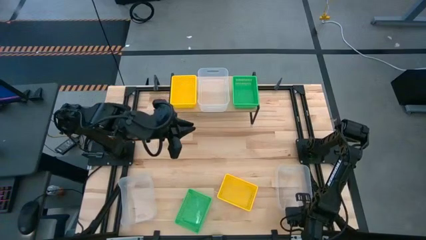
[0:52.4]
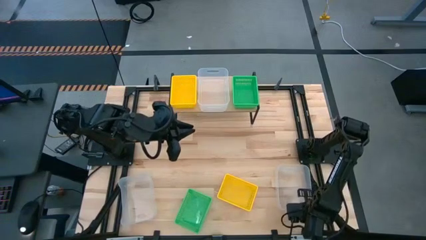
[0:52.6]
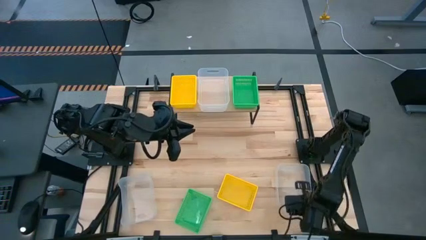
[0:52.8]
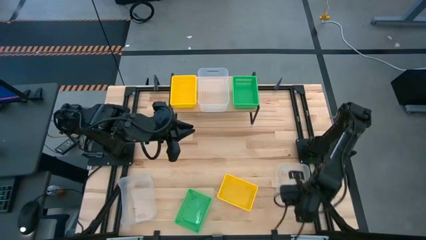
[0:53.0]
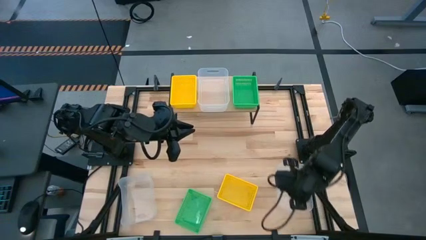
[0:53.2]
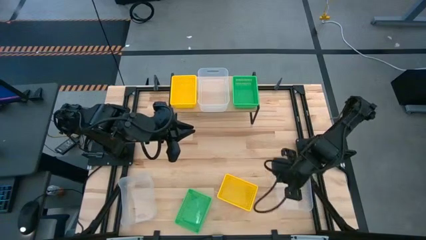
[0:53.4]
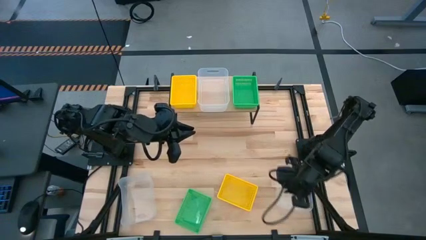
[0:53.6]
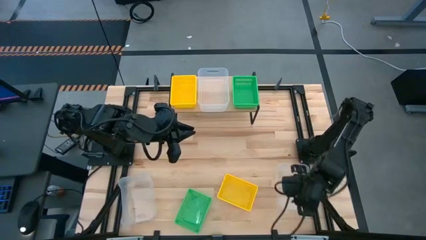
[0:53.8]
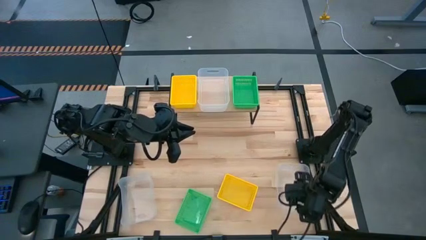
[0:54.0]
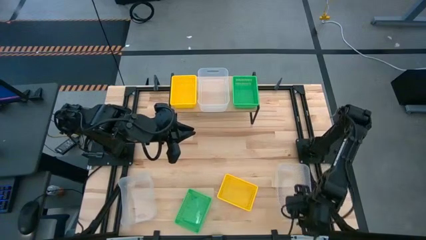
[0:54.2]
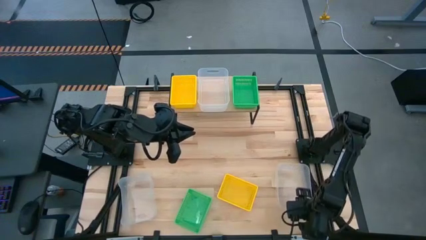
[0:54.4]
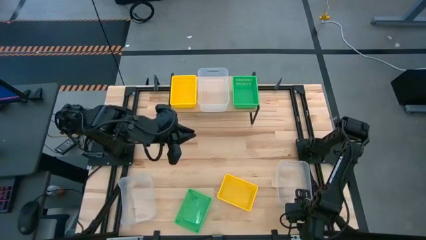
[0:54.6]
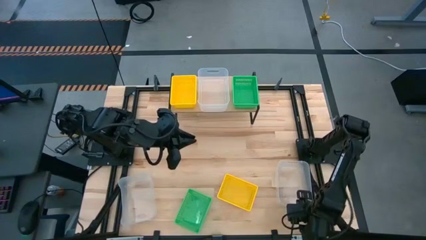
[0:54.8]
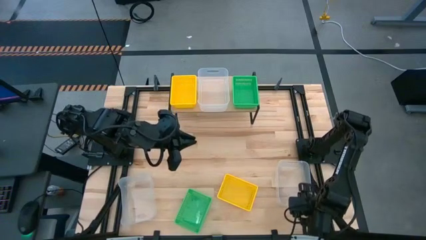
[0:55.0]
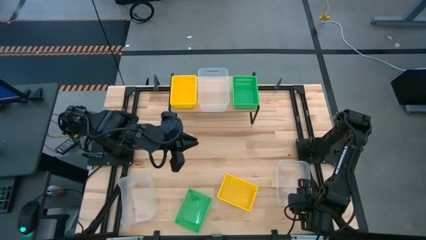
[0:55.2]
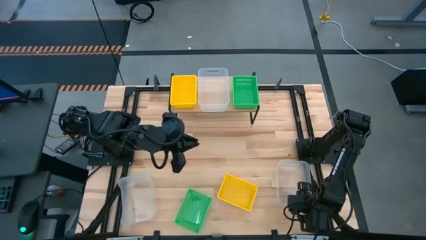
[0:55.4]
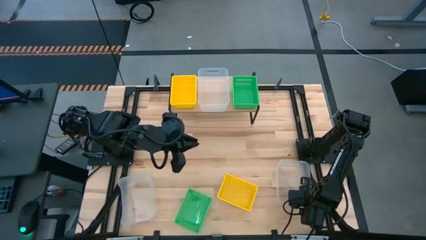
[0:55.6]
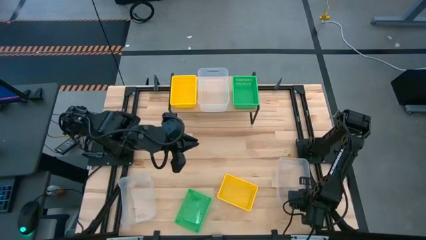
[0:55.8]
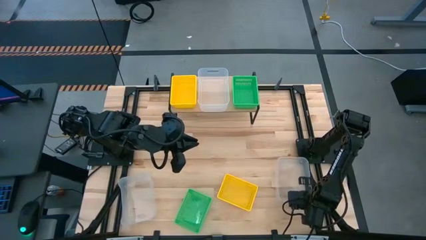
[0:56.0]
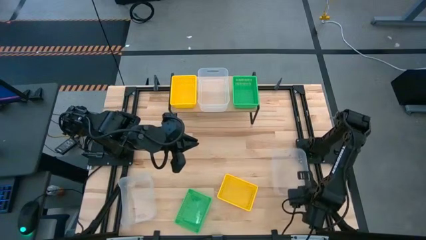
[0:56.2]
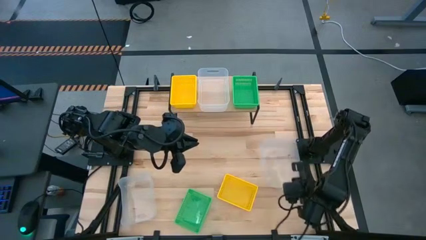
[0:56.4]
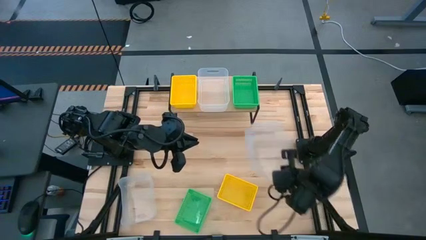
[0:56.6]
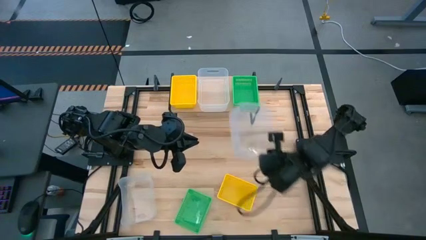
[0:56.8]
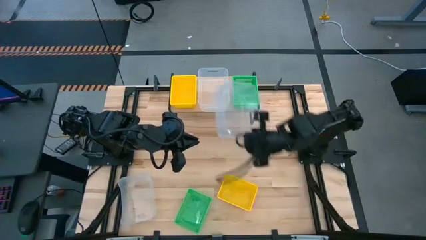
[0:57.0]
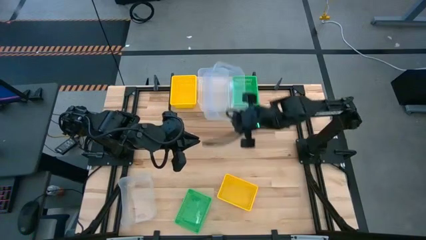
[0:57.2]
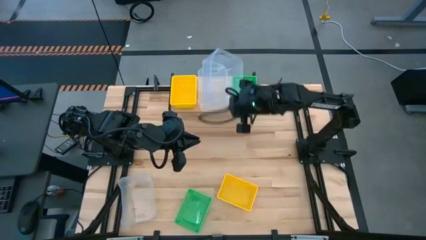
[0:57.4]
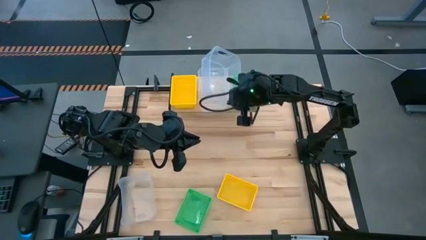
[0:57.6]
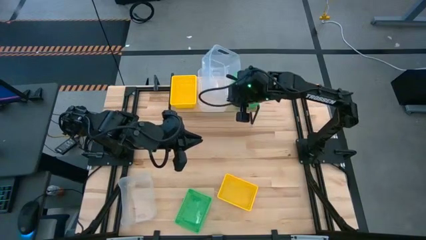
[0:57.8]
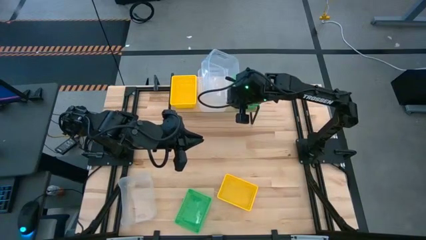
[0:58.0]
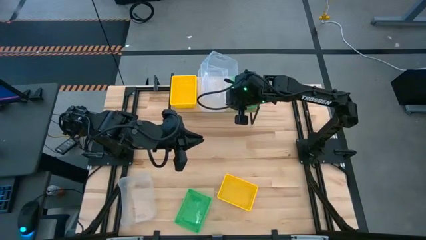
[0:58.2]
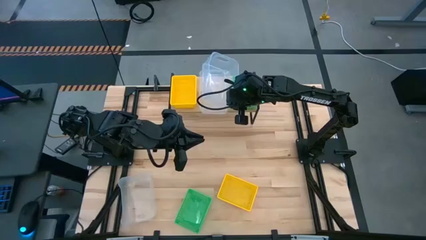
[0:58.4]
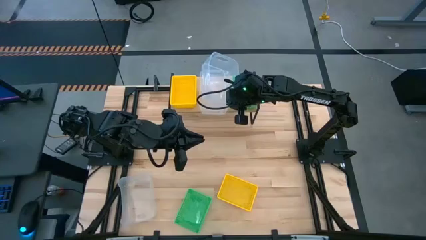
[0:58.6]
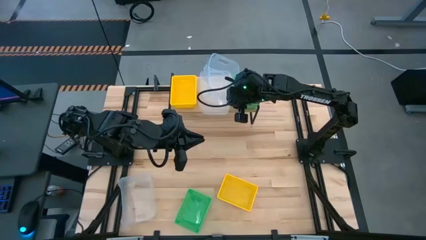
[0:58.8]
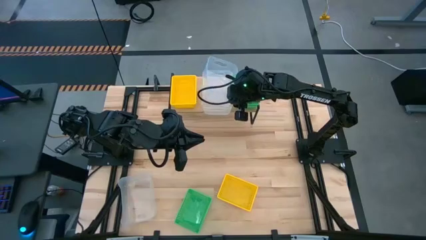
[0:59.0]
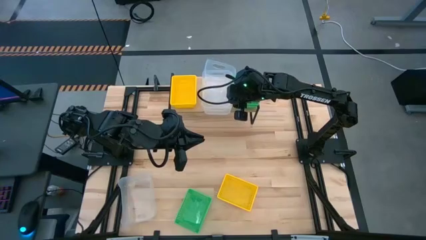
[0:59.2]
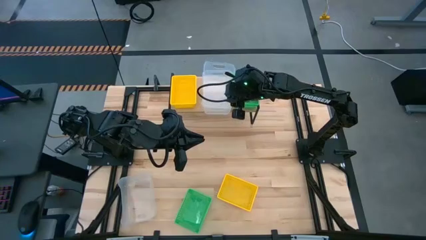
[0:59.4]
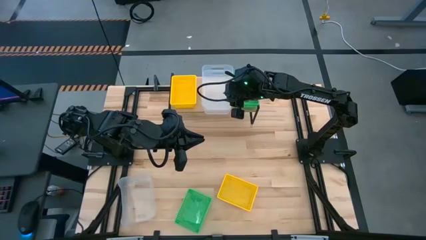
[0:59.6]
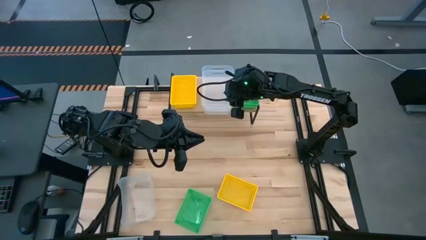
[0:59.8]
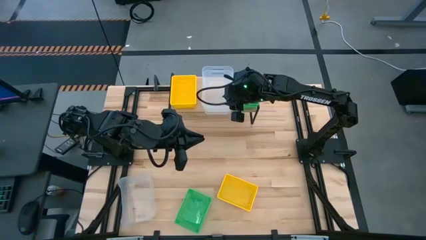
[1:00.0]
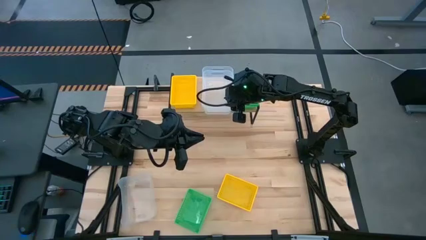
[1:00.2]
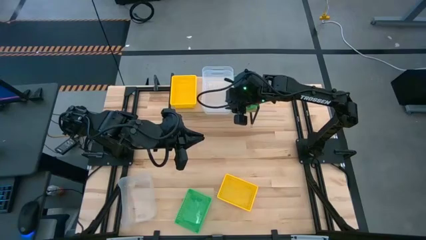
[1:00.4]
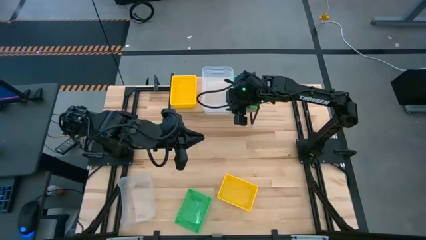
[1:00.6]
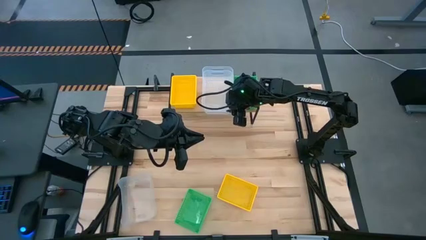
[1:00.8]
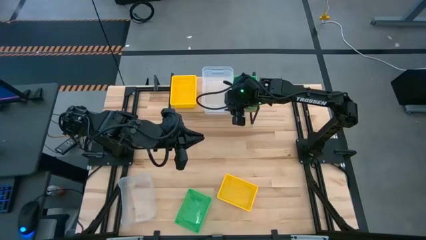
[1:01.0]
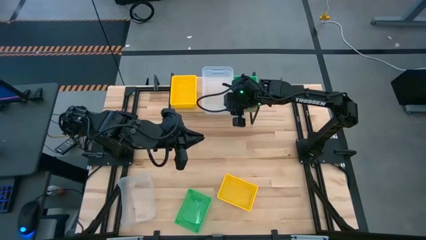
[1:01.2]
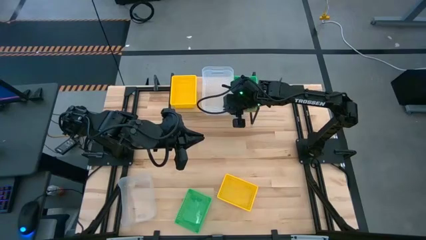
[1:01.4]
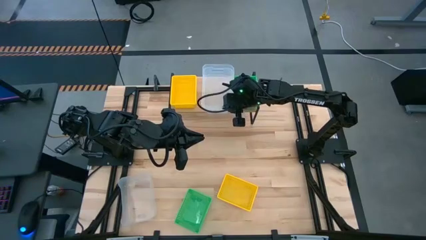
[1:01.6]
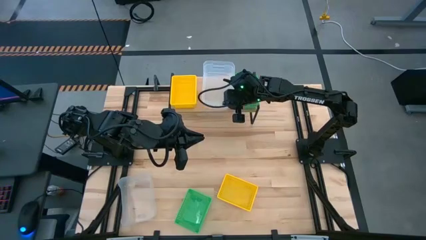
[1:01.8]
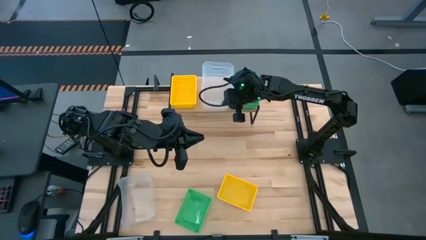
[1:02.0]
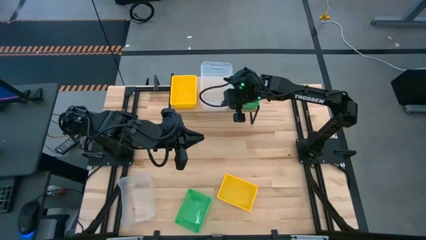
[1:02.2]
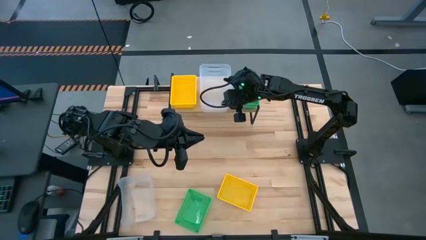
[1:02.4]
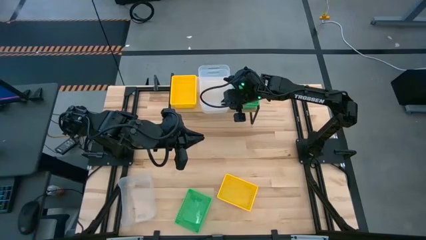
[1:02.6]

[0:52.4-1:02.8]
Task: Stack baskets on shelf by color
Stack the right transparent bin on top of the transparent bin on the shelf

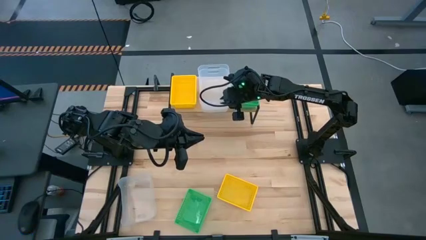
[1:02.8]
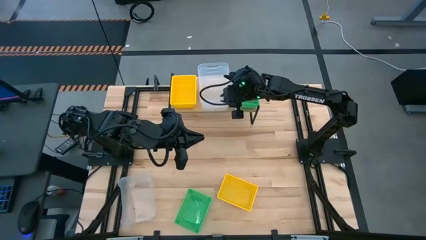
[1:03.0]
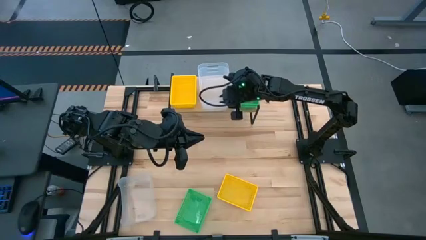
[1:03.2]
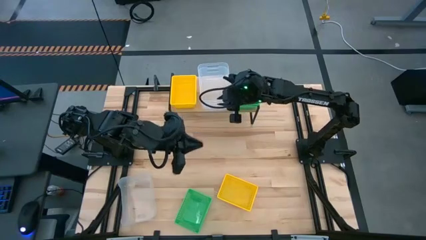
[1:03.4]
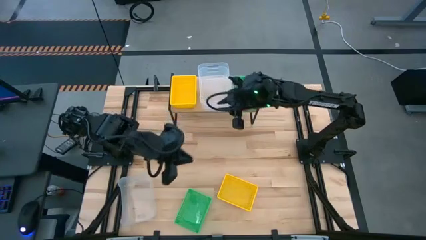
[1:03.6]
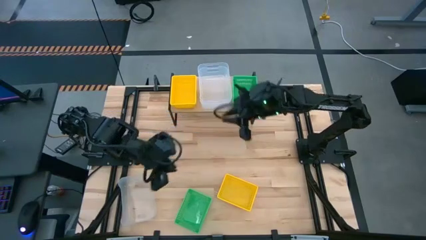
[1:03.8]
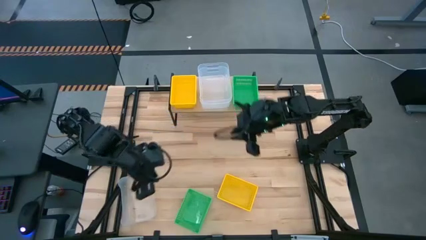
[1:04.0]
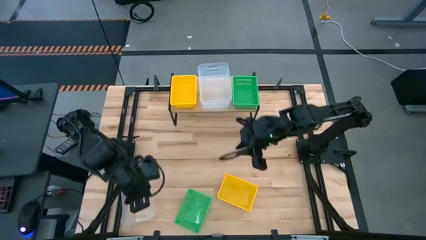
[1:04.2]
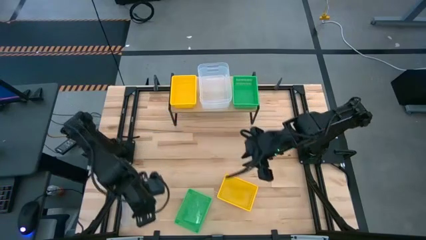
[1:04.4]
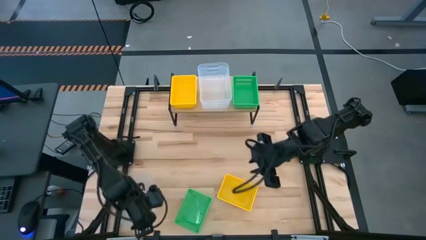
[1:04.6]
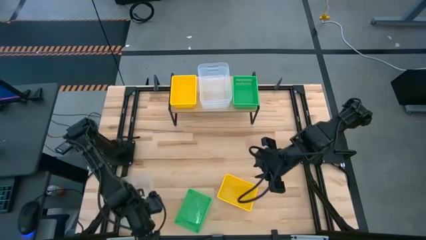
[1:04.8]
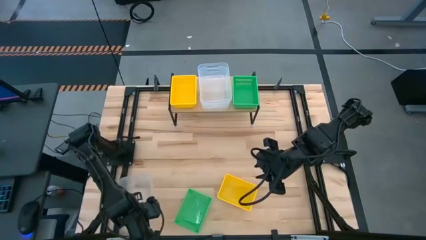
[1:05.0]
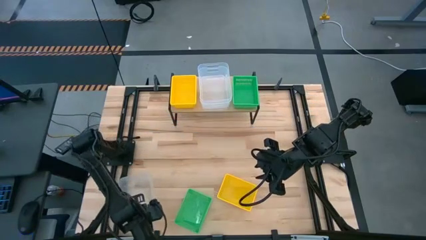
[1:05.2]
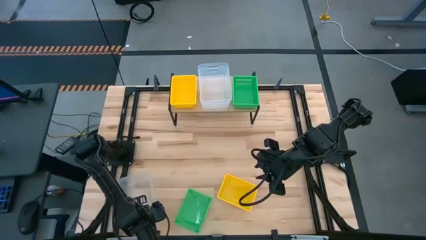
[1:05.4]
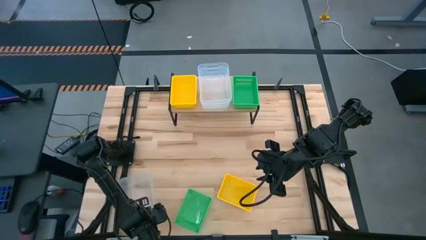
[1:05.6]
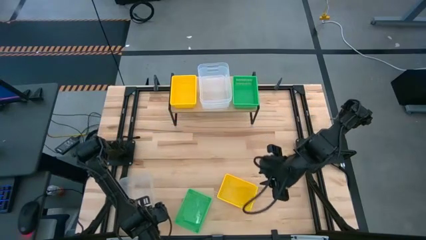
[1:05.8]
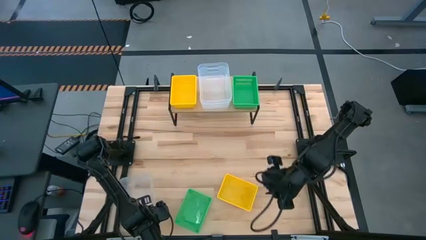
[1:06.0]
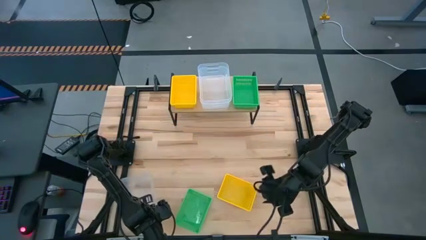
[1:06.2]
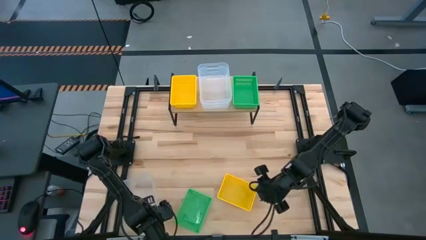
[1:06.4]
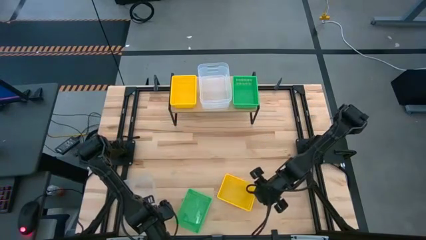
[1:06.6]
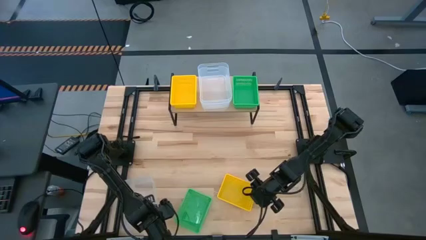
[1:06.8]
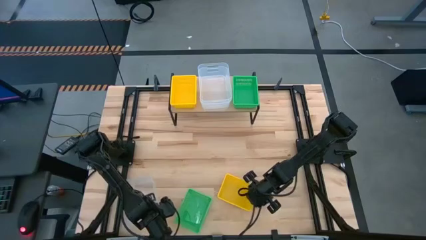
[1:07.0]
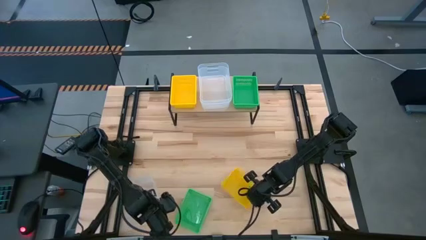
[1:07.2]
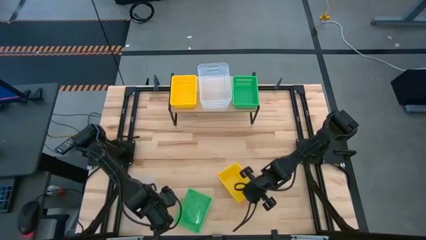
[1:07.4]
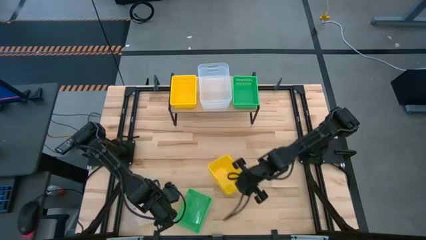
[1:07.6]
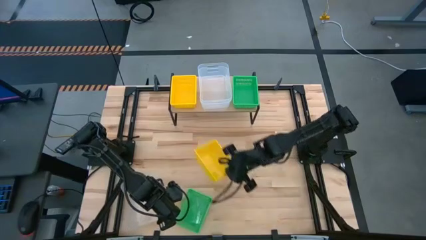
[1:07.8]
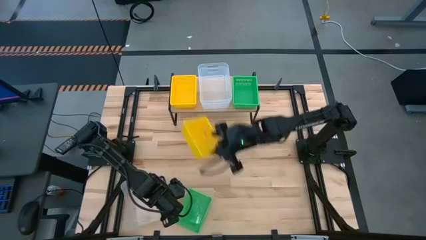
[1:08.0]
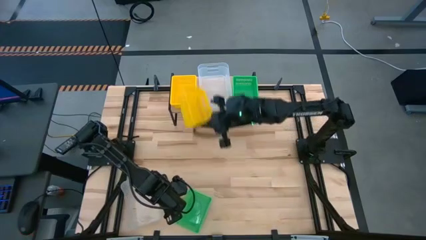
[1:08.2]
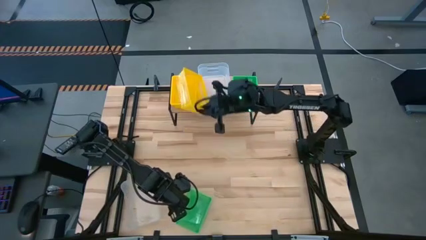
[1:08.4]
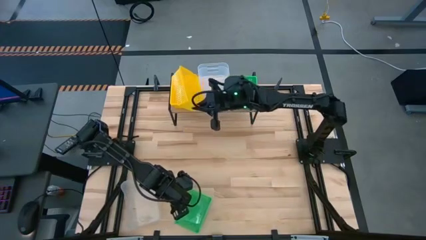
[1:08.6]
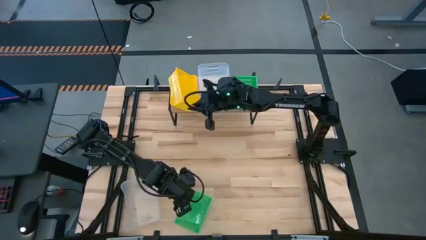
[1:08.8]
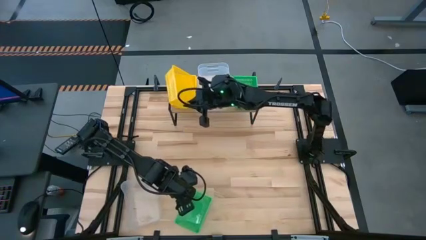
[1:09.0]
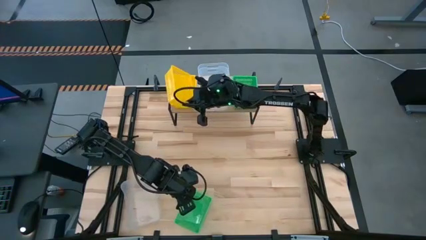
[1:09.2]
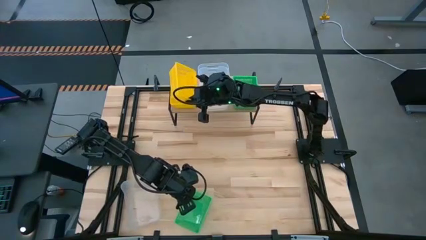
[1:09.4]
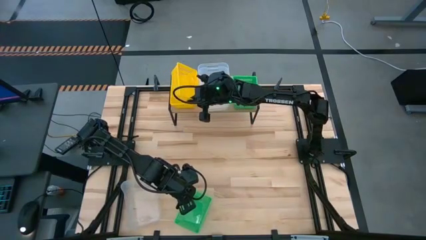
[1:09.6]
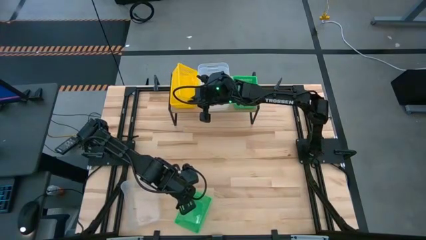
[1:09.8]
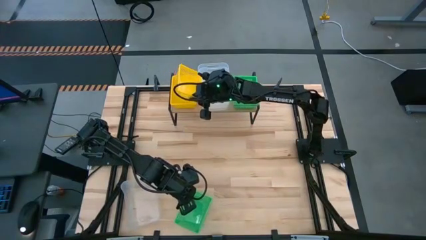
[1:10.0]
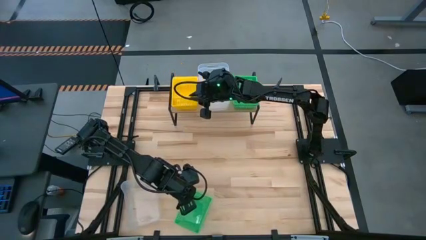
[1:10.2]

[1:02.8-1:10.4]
Stack the yellow bin on top of the yellow bin on the shelf
